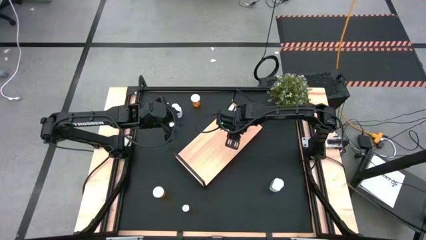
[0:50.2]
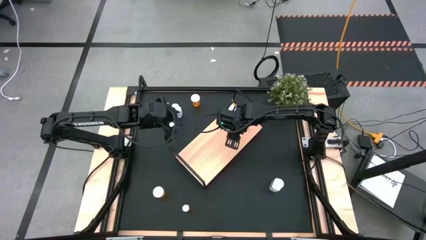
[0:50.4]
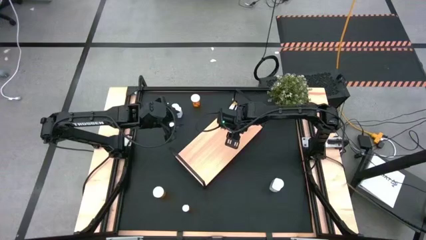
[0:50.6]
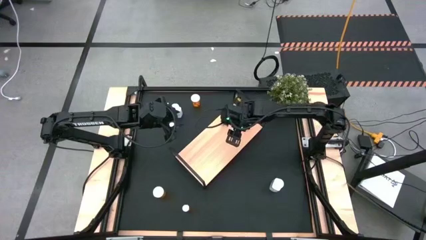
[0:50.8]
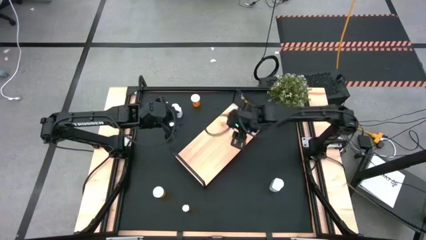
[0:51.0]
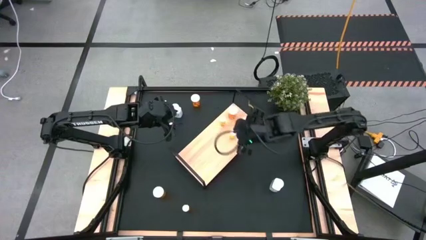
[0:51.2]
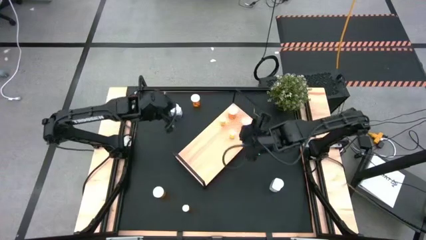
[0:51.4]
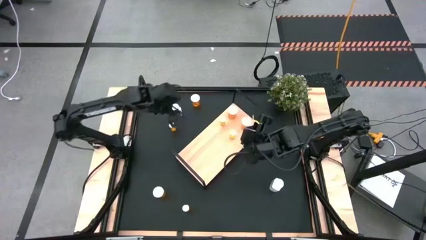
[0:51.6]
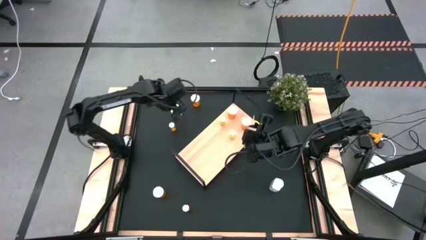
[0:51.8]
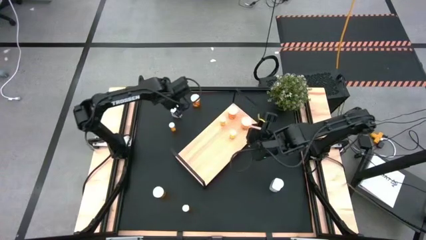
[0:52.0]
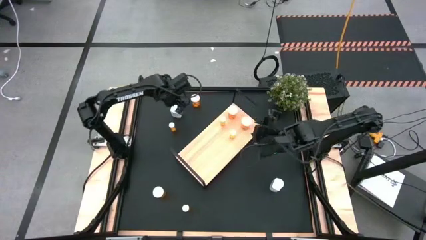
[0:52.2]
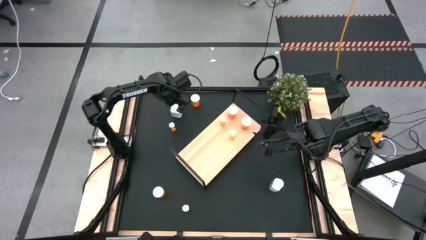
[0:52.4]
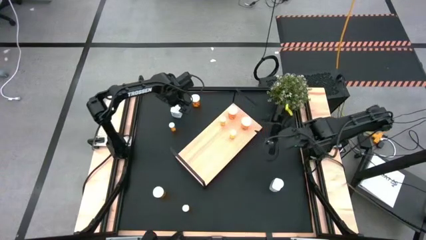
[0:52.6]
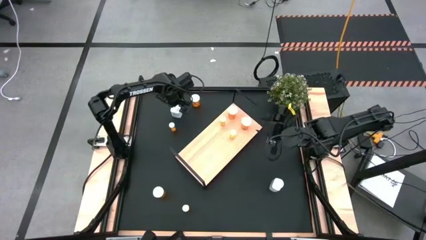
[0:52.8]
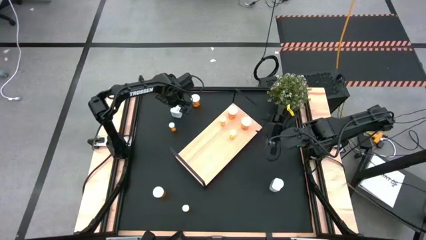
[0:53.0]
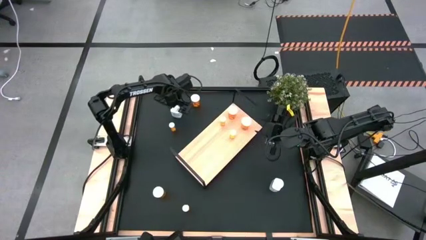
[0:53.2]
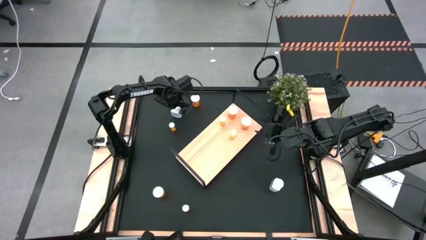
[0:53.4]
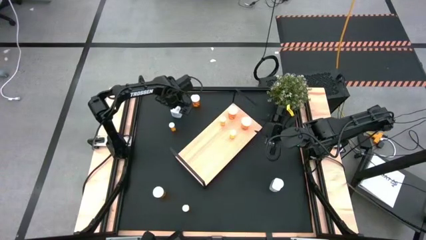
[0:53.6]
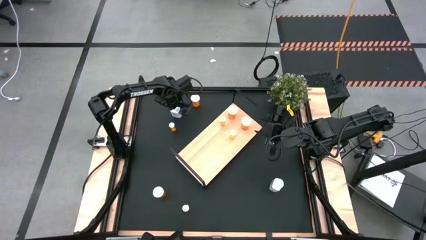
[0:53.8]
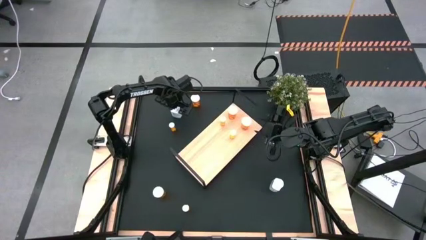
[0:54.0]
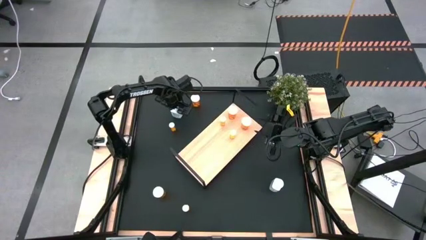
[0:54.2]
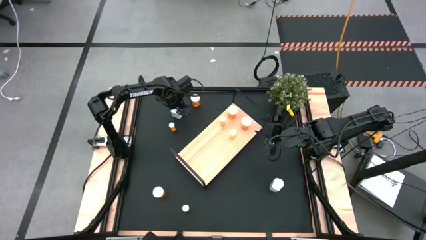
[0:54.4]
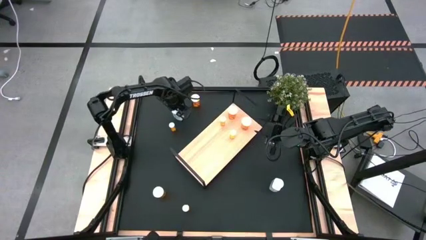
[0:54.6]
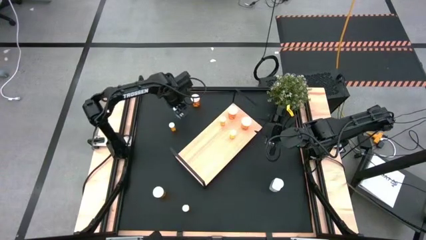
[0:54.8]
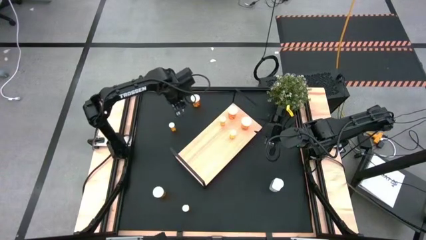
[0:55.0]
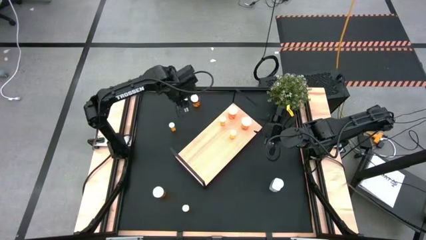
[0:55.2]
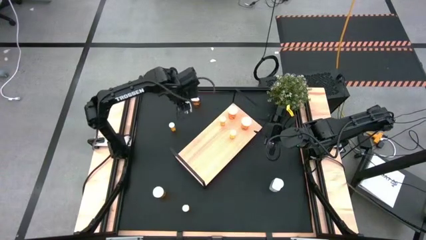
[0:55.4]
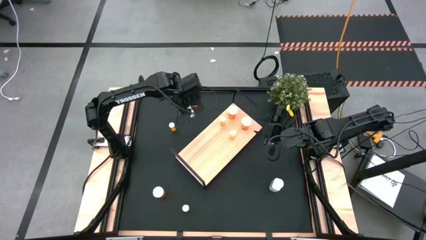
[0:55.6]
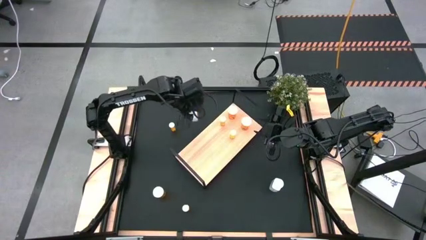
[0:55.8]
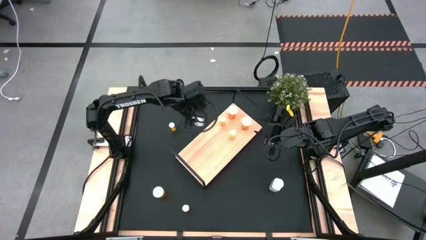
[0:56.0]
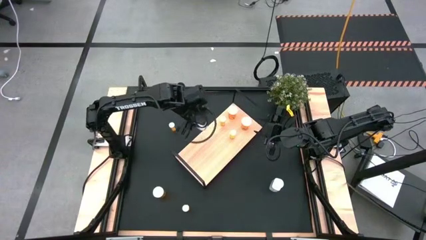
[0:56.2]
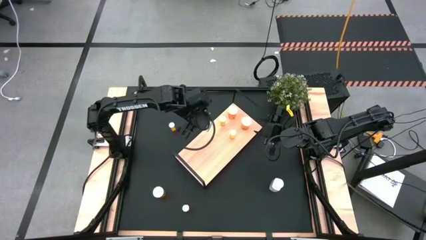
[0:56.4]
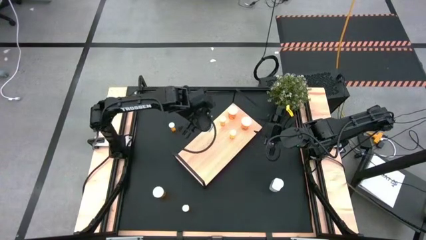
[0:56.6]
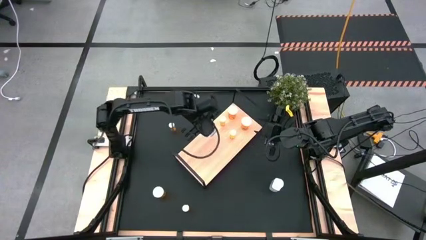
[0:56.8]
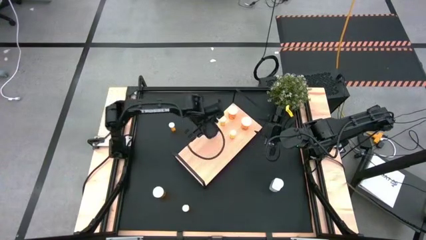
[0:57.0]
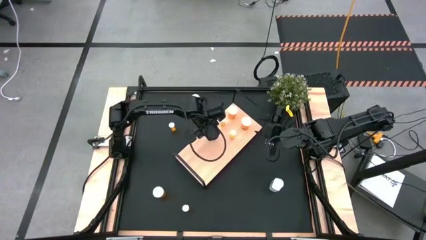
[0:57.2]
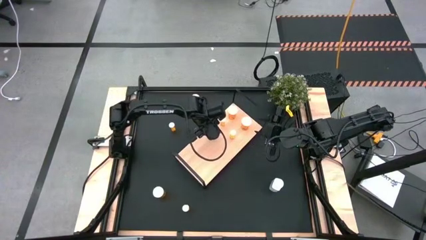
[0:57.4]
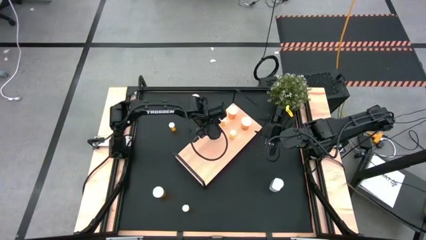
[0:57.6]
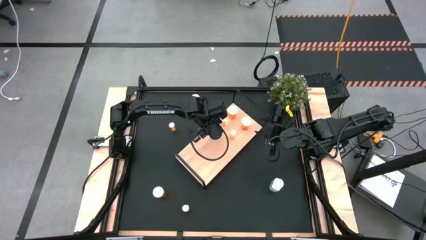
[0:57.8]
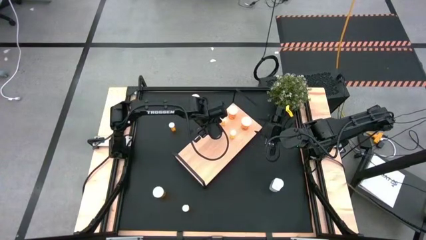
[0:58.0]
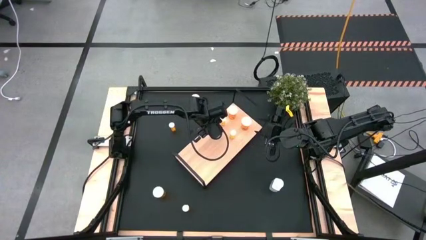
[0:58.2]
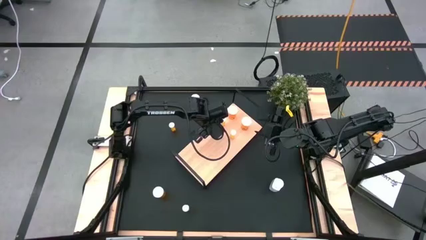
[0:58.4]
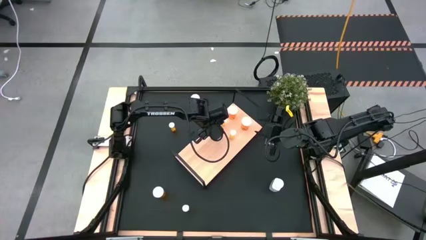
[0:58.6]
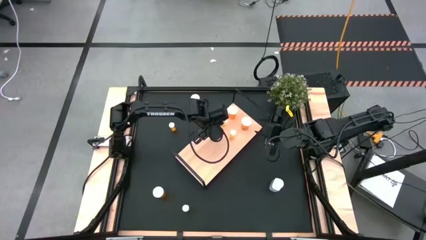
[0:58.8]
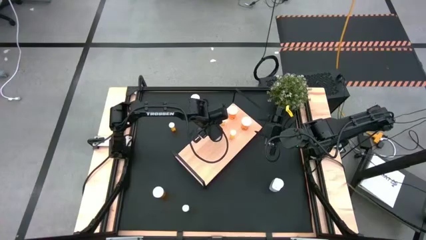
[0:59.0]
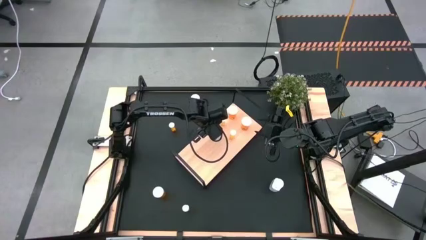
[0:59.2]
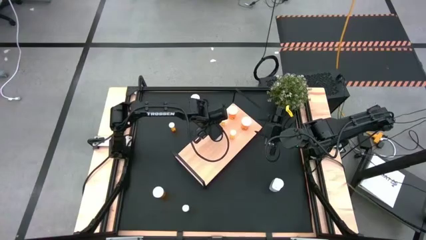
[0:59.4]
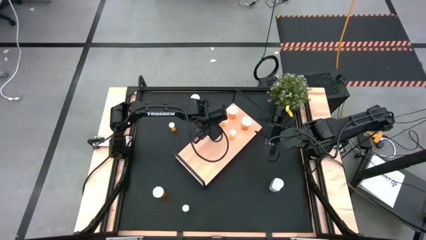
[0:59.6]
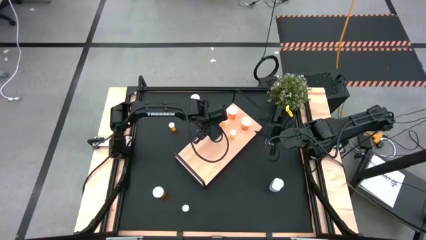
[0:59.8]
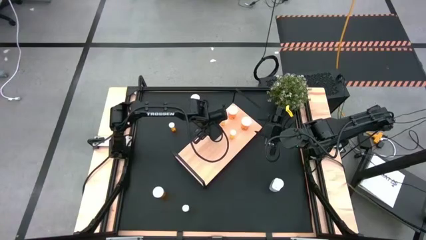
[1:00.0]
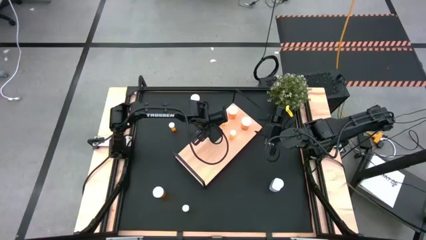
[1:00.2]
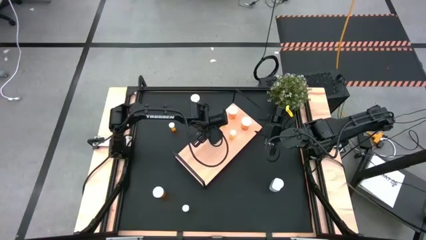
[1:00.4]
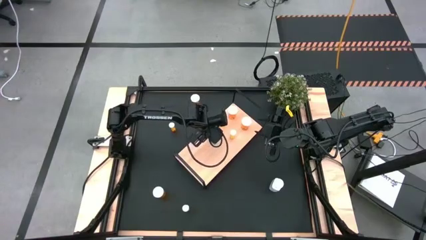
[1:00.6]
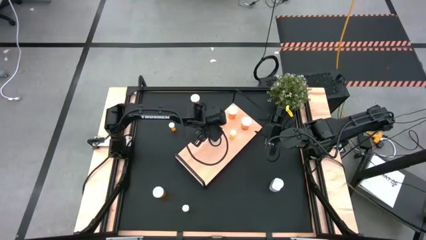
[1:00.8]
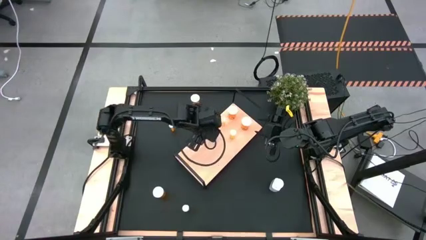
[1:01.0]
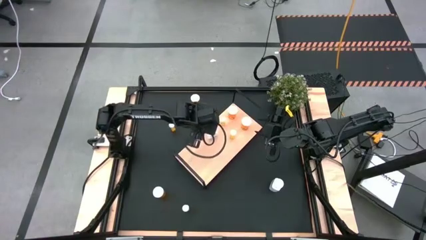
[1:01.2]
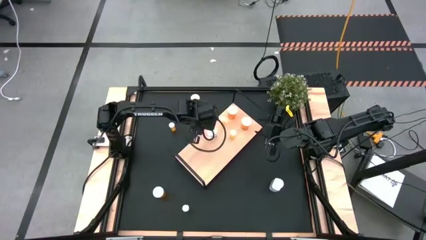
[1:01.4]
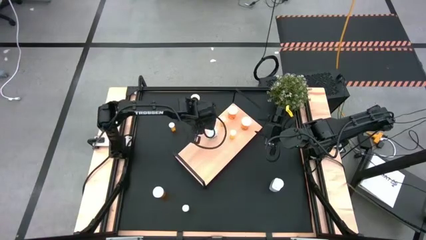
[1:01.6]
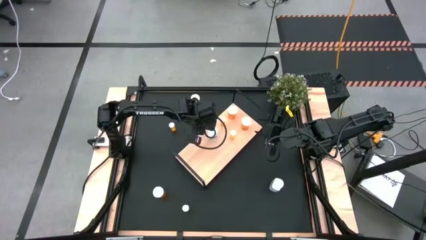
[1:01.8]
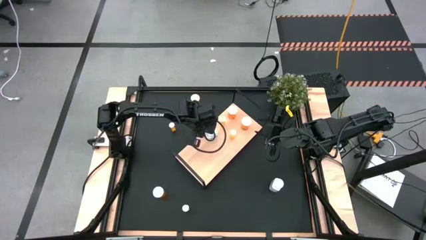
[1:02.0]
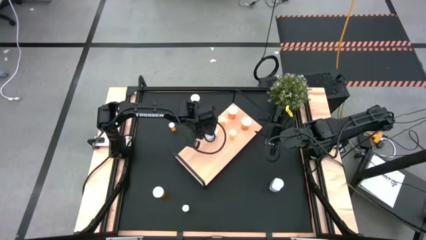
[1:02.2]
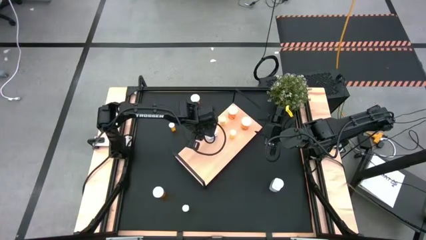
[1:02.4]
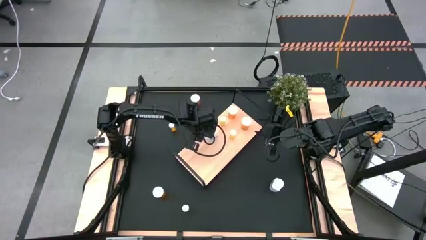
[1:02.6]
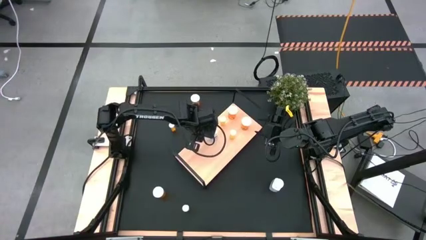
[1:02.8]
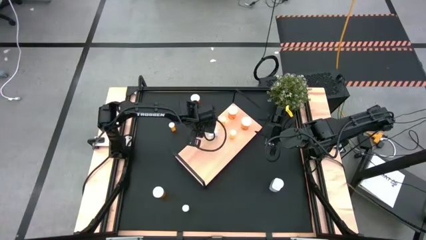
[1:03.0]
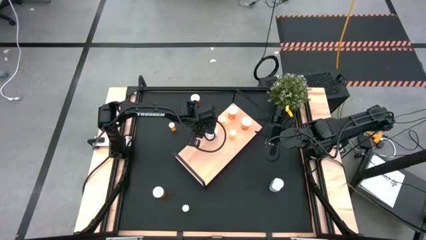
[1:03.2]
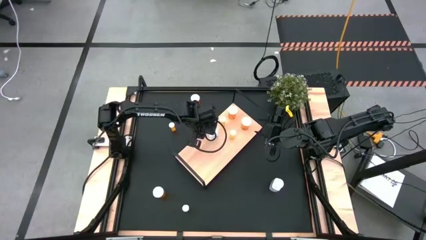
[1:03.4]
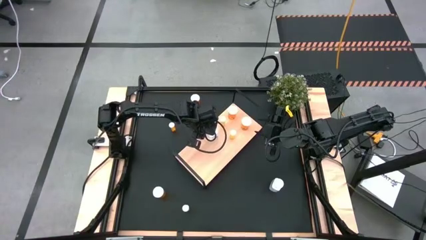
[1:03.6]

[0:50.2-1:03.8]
Task: Pick and place medicine bottles onto shelf by color
Put the white pill bottle on the shelf

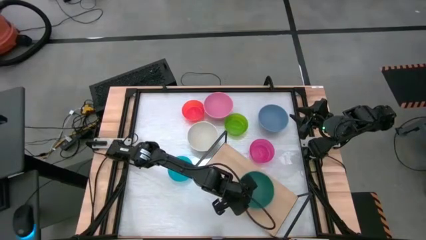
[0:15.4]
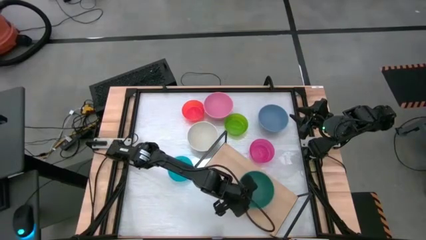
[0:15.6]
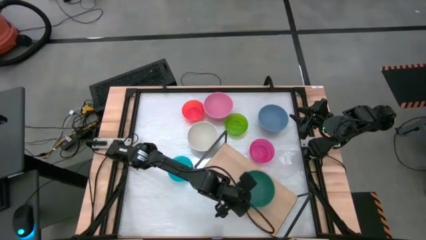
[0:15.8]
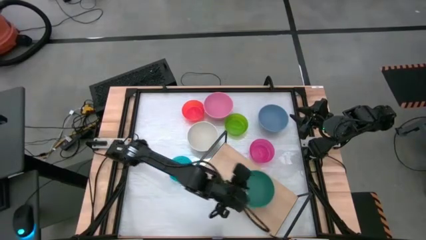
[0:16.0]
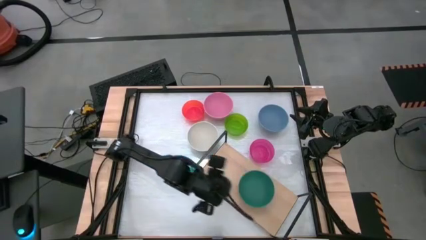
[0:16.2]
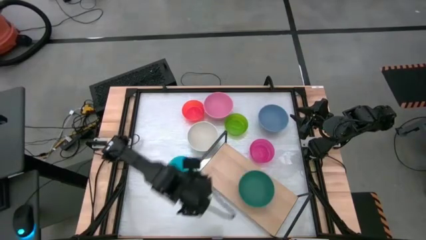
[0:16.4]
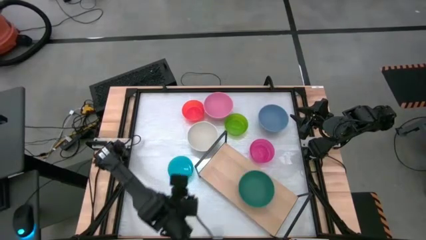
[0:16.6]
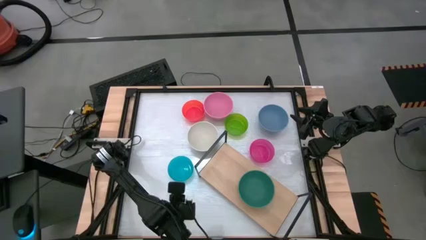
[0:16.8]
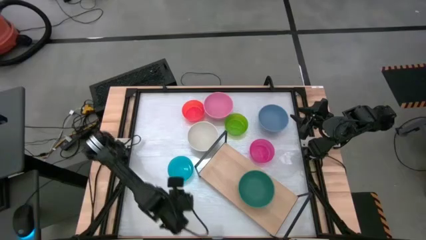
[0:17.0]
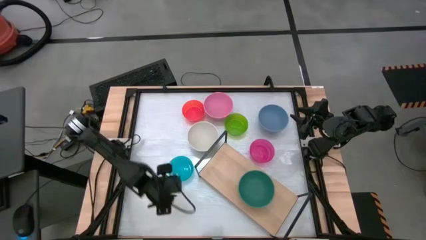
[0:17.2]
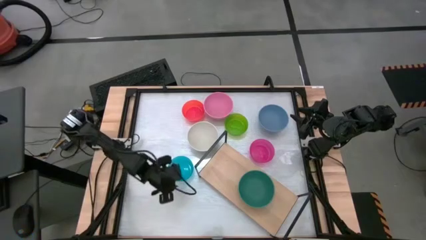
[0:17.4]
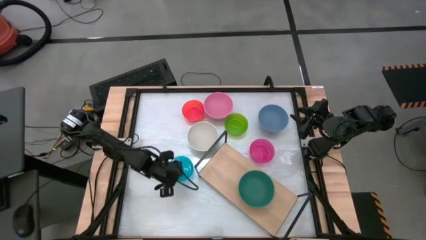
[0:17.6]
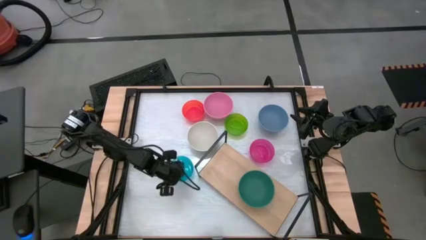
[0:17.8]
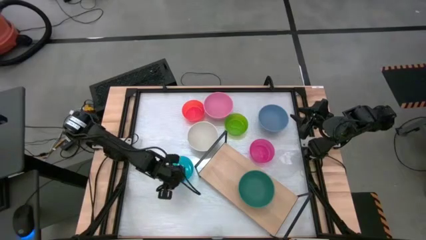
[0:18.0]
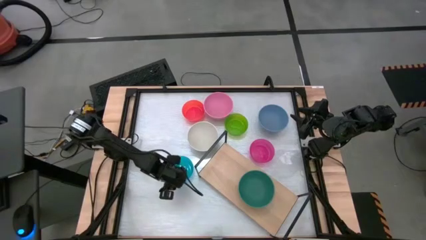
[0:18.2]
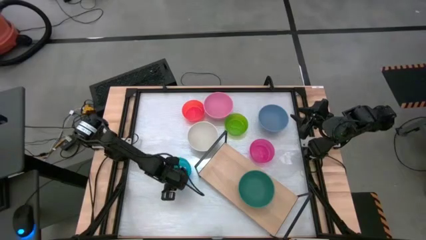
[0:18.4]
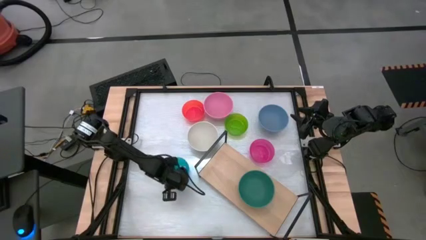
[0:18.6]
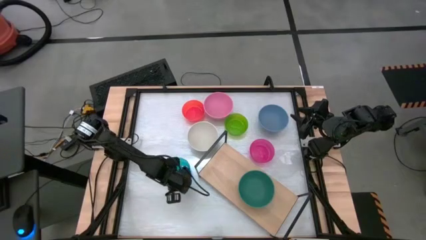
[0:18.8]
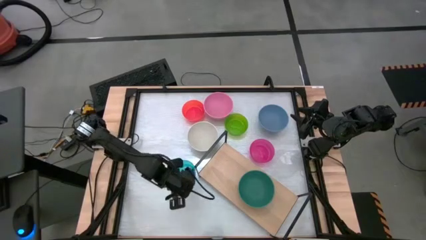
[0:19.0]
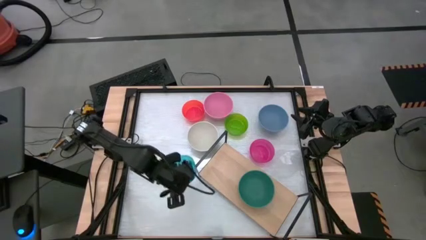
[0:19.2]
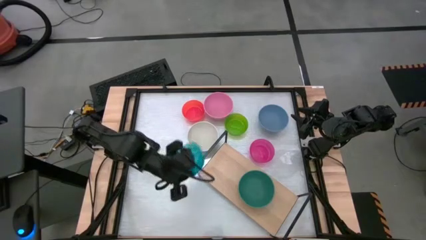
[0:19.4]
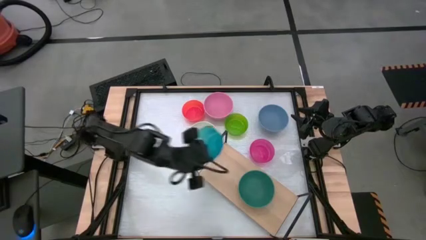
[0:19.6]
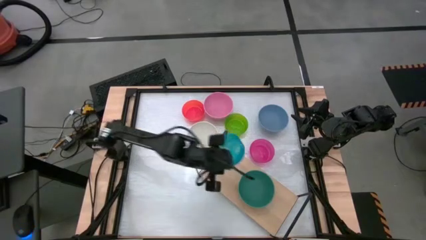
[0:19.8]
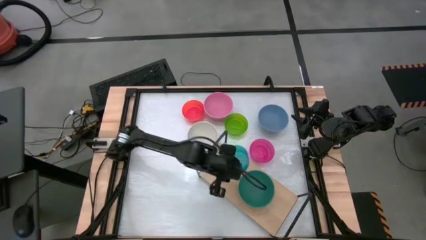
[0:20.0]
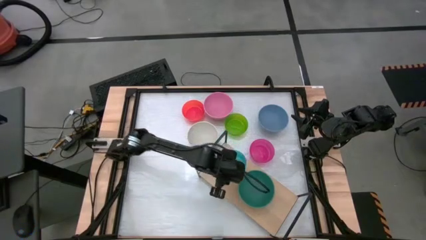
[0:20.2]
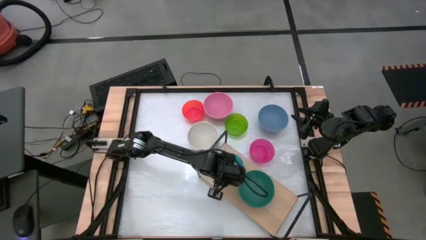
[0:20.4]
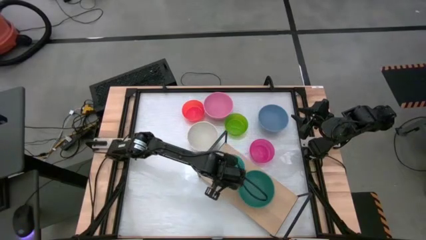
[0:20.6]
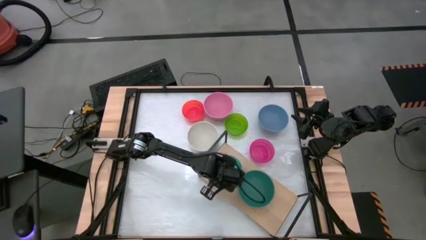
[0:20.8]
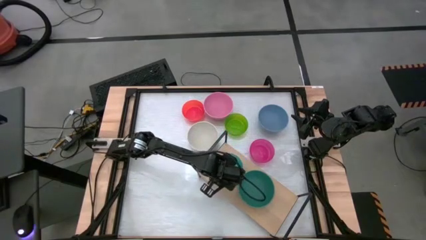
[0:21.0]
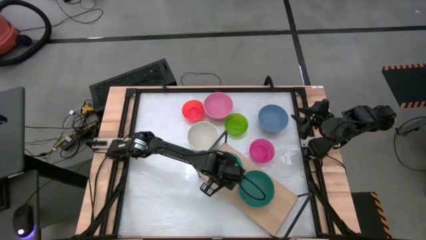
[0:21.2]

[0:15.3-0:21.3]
Task: Place and stack bowls onto a shelf
Put the small blue bowl on the shelf
